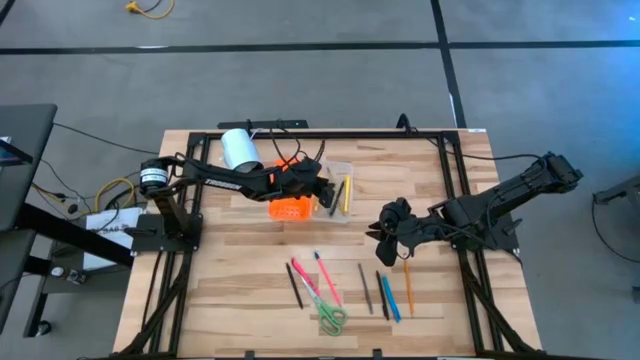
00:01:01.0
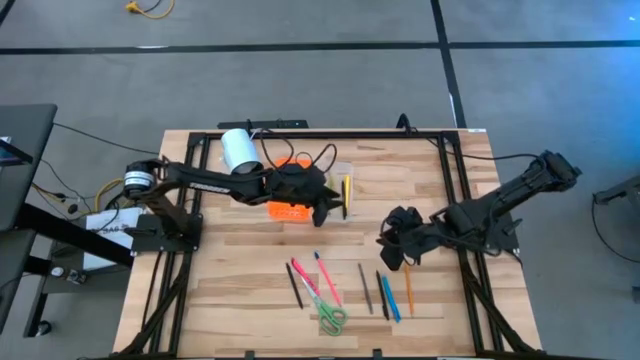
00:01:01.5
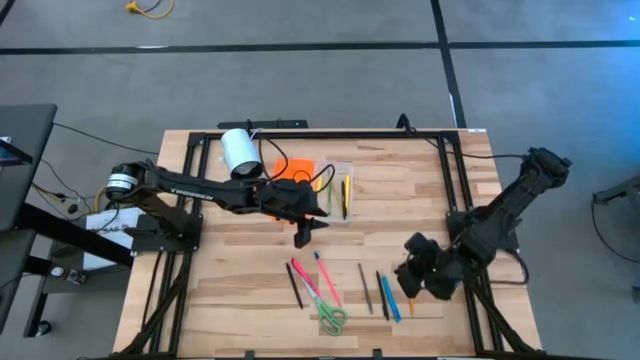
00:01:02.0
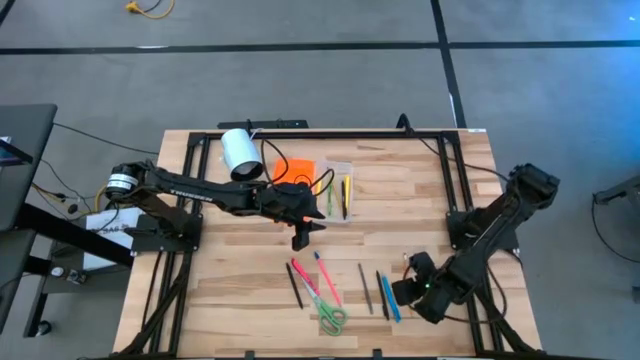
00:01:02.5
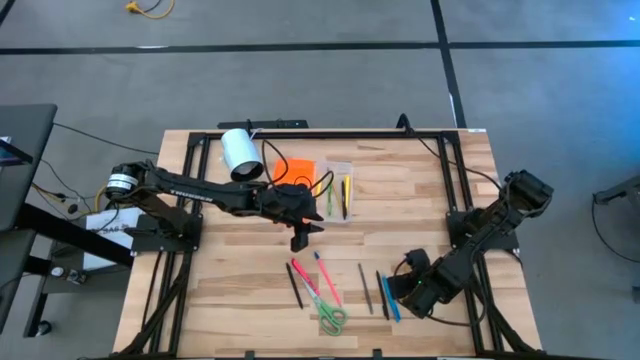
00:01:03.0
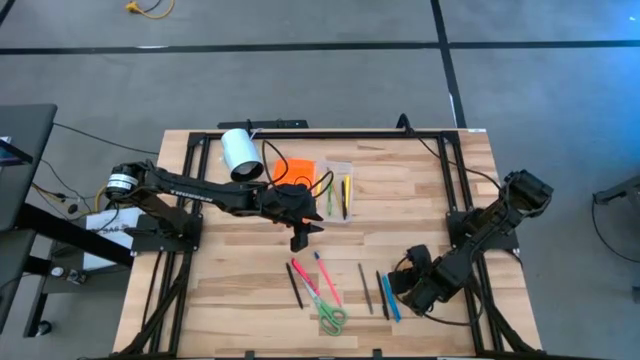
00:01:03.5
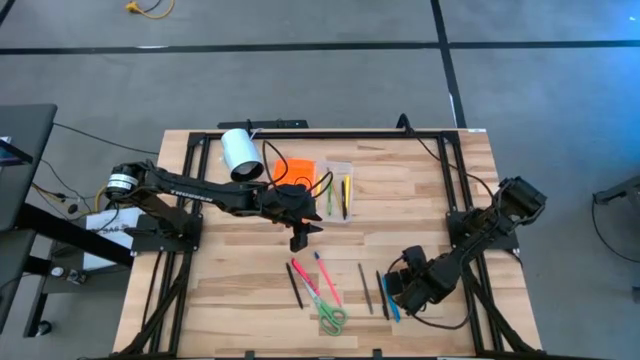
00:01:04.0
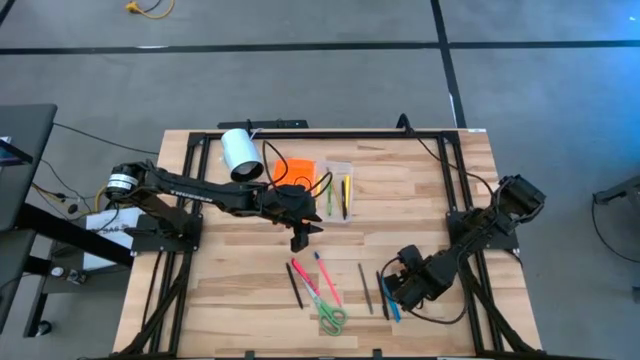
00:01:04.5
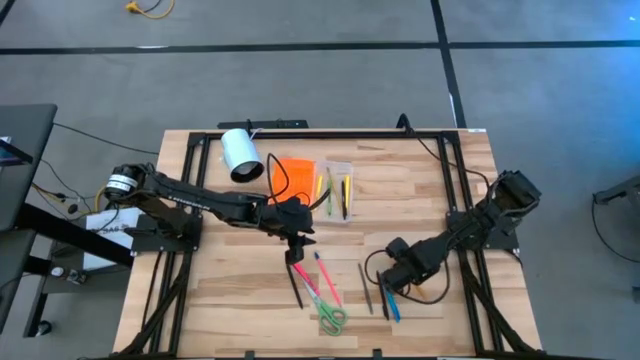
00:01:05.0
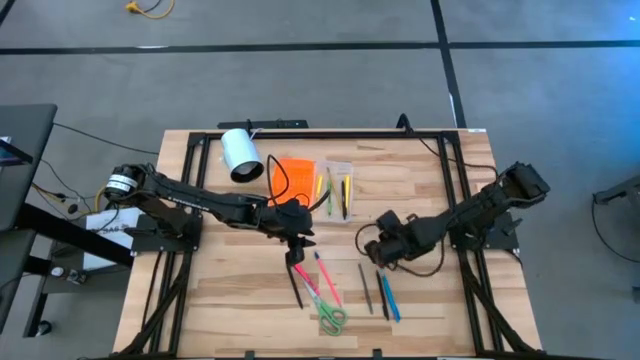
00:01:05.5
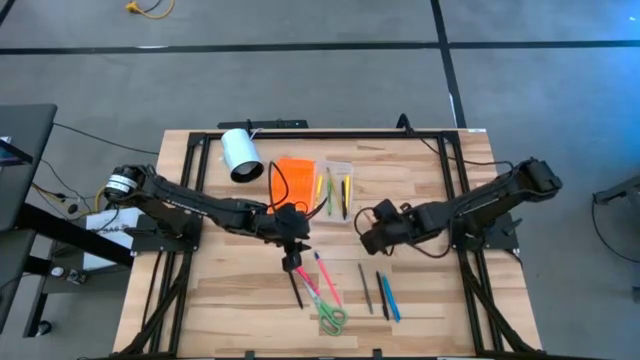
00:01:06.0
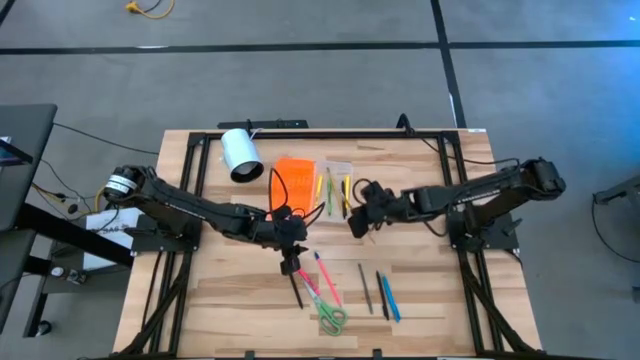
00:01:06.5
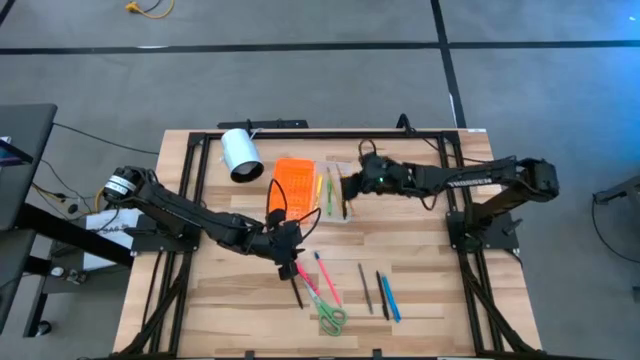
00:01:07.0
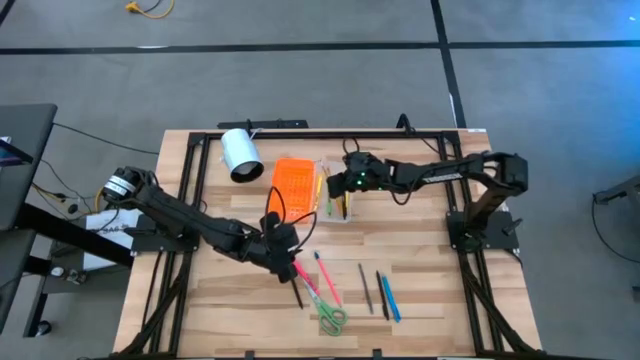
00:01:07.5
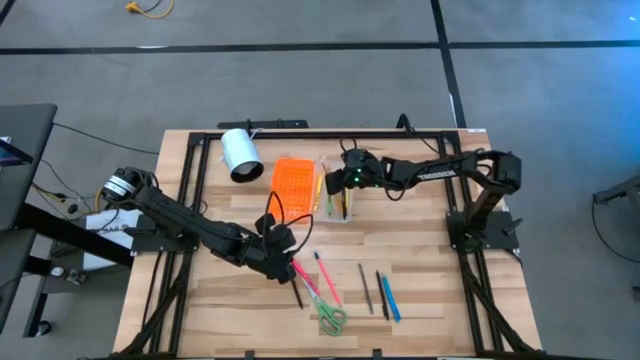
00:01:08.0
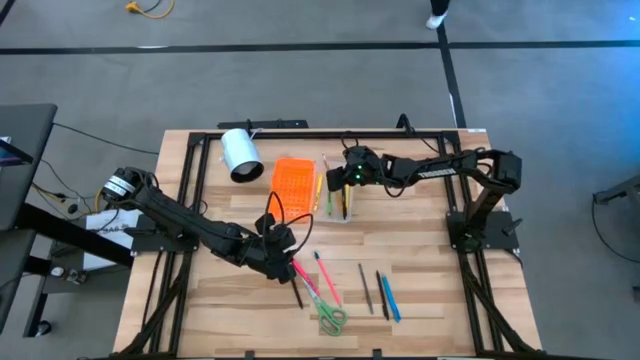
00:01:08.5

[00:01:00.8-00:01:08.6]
Task: Pick & place school supplies into a supply box
Put the orange pencil into the orange supply box

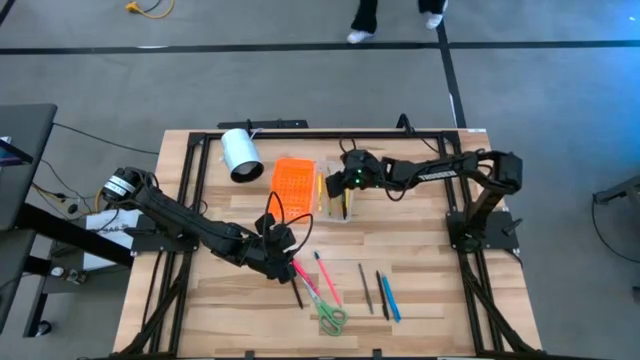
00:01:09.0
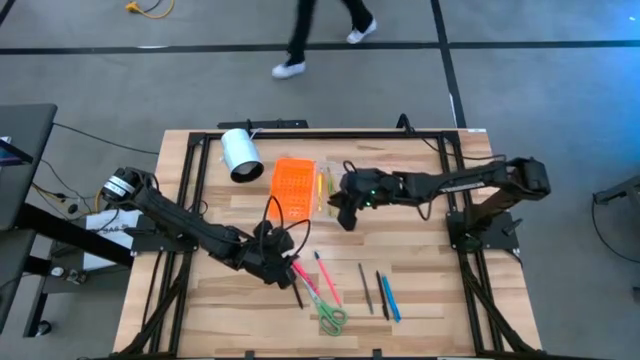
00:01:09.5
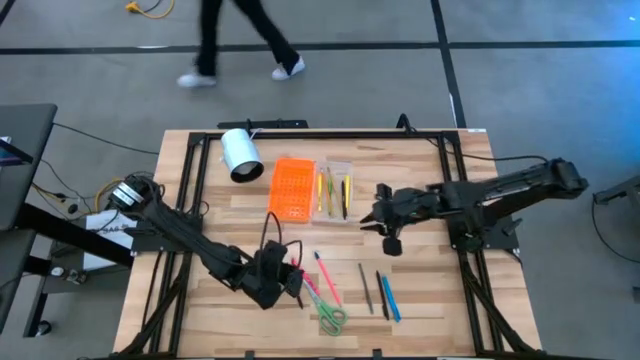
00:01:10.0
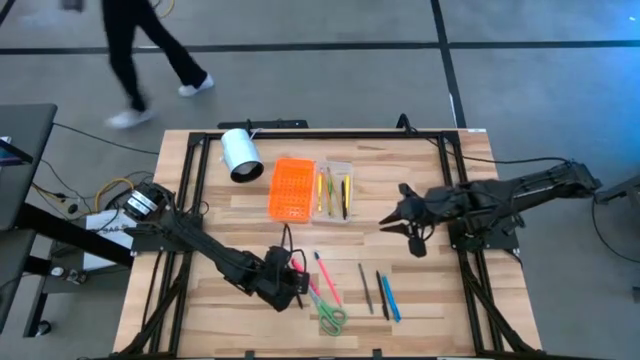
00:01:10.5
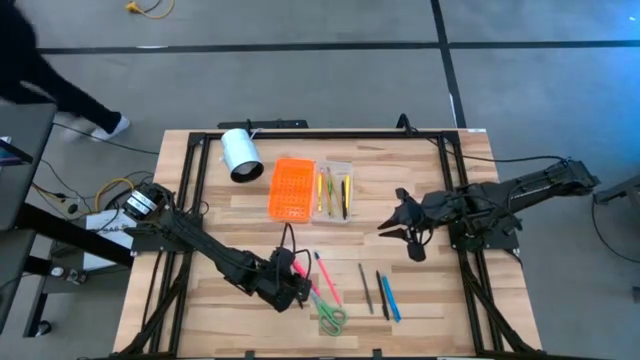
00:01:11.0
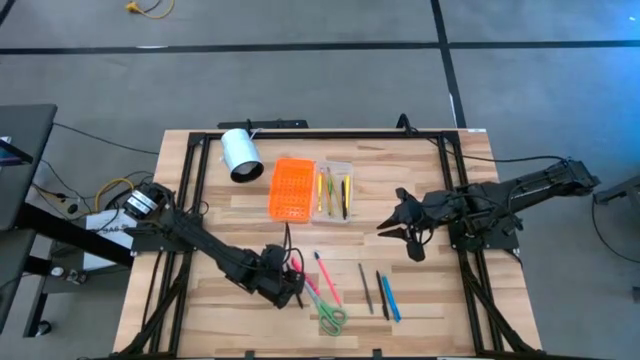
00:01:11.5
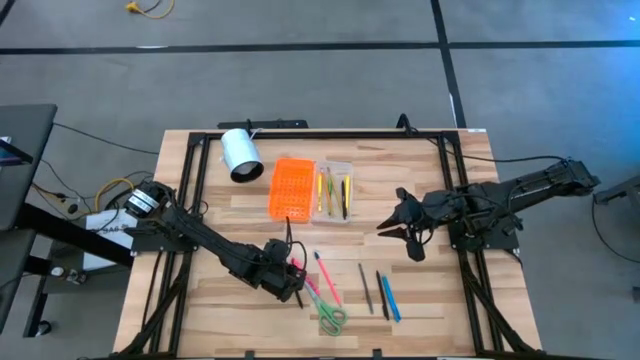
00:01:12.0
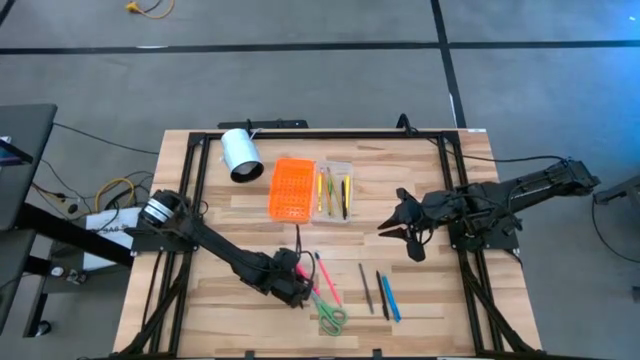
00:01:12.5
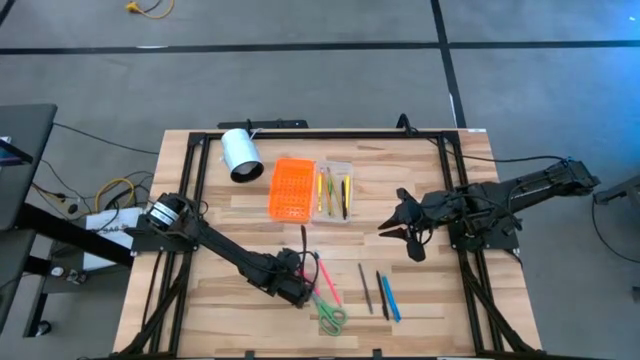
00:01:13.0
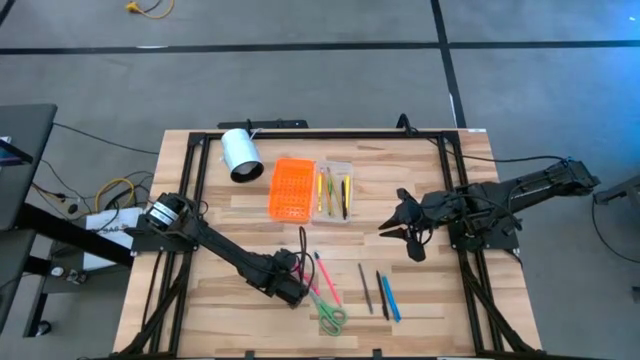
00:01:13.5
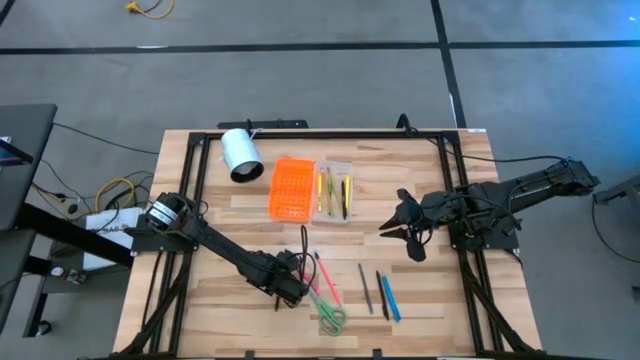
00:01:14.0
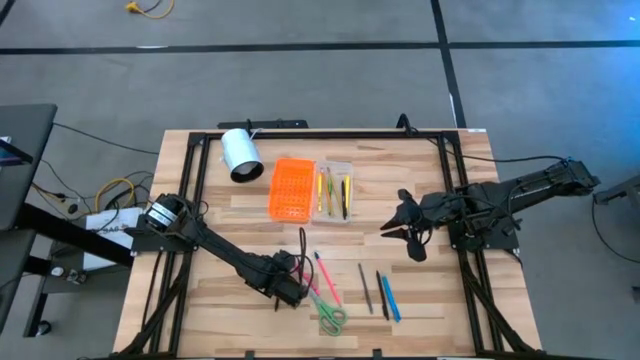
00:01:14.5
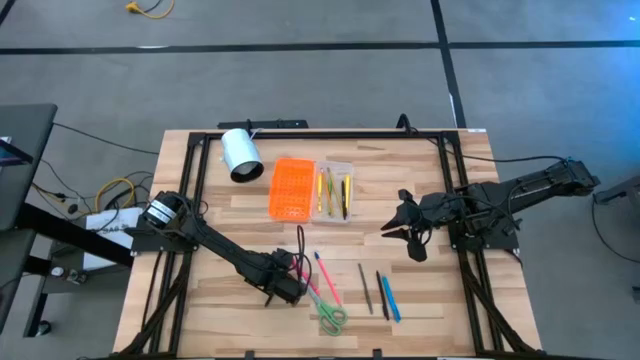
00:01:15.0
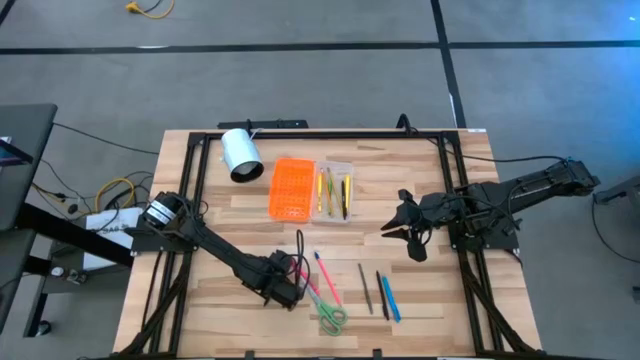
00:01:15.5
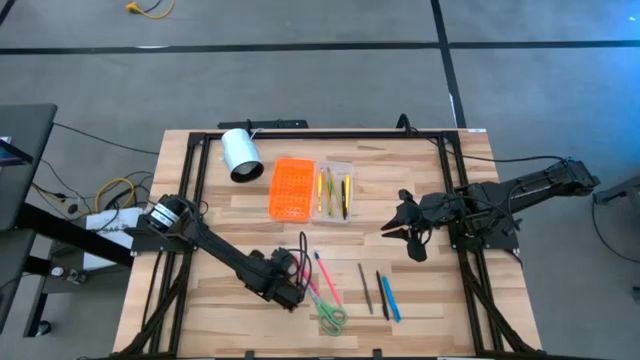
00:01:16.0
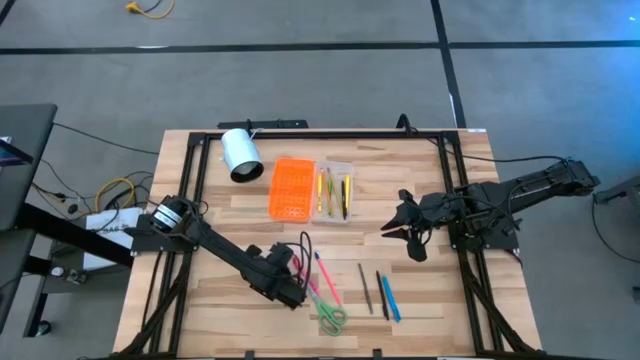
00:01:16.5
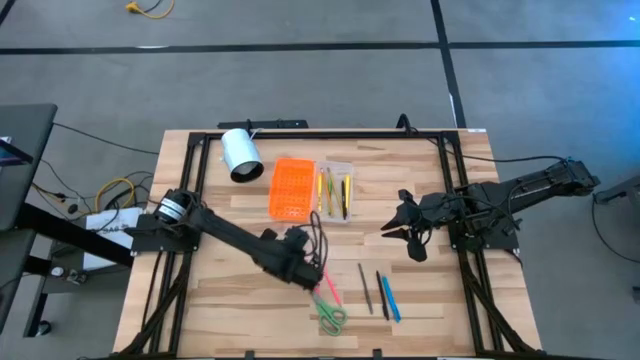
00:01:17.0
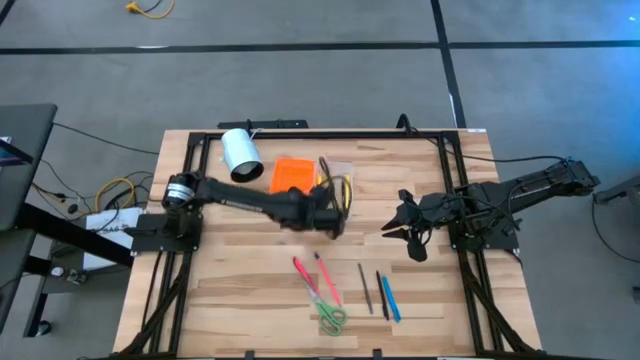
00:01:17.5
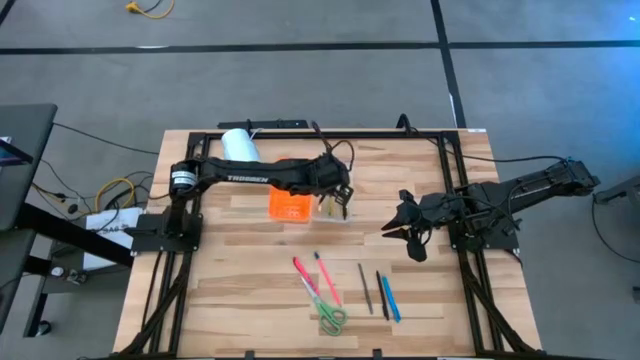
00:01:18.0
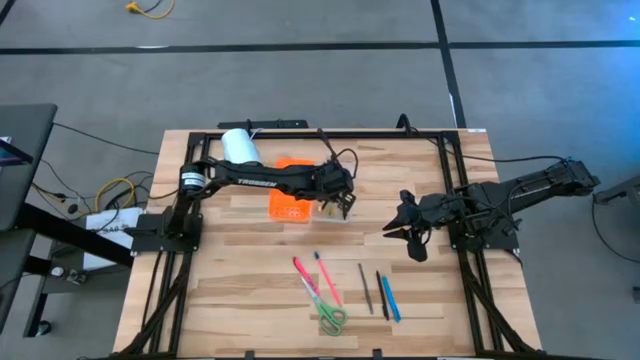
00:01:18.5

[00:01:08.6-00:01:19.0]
Put the left black pen into the orange supply box

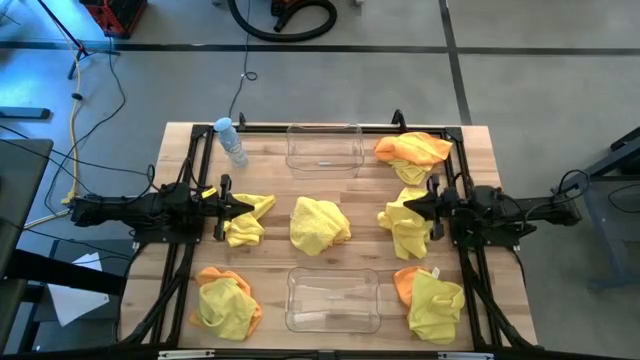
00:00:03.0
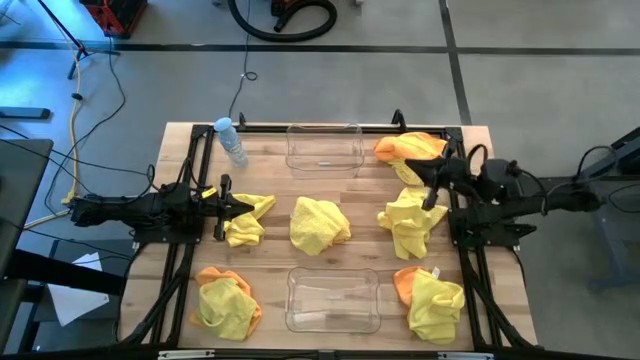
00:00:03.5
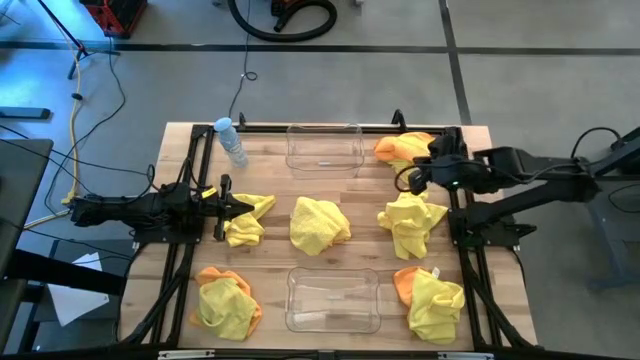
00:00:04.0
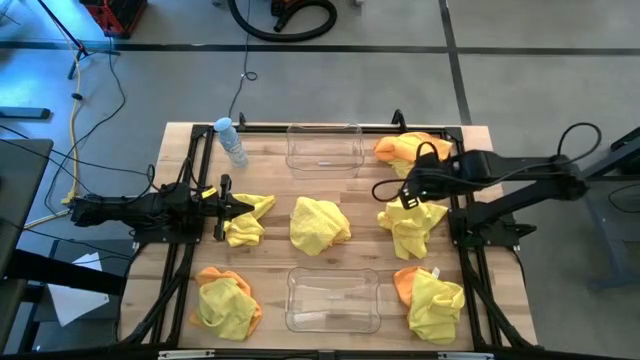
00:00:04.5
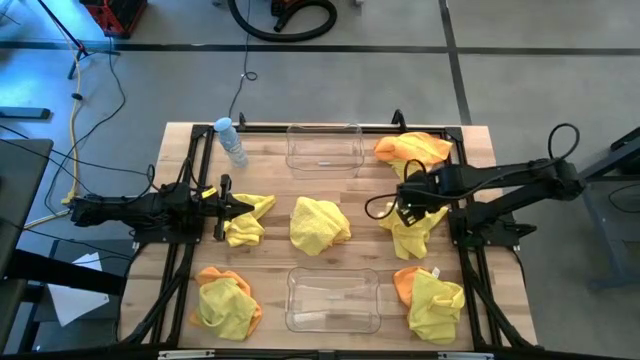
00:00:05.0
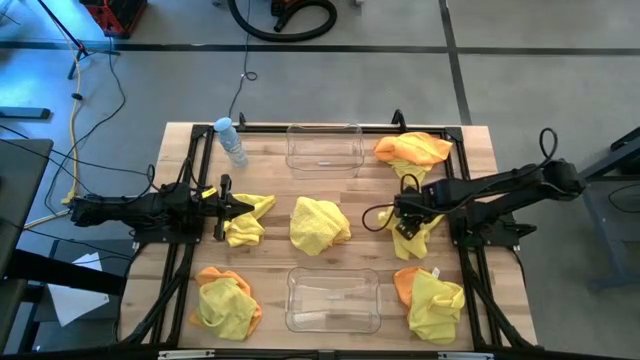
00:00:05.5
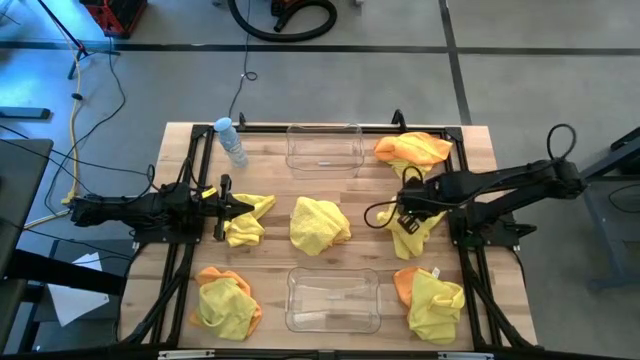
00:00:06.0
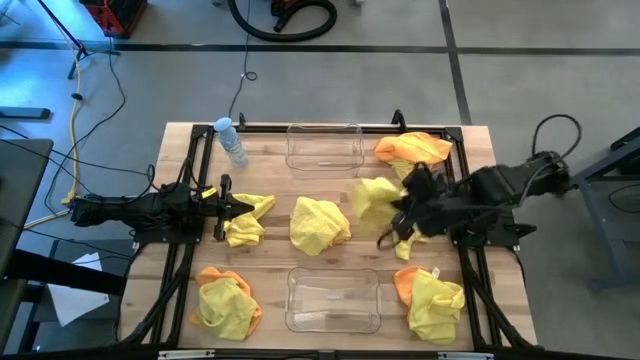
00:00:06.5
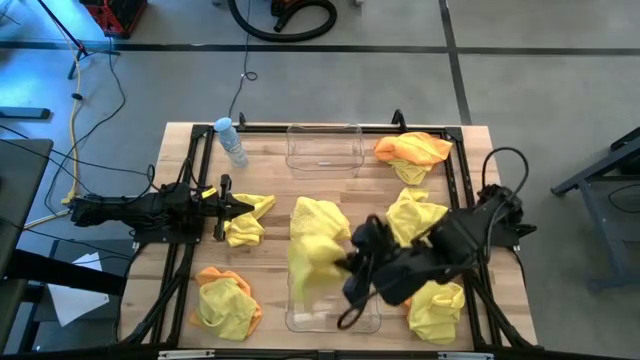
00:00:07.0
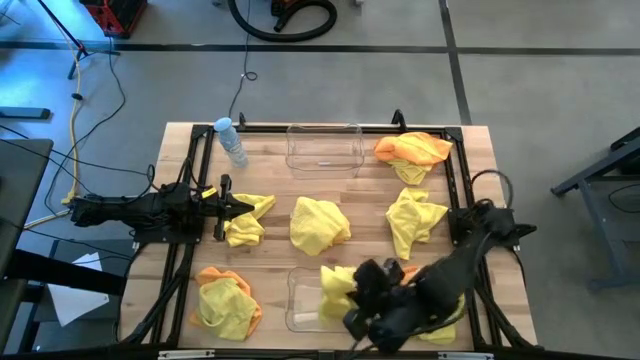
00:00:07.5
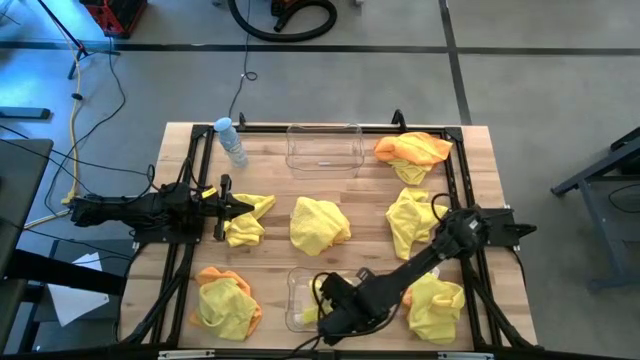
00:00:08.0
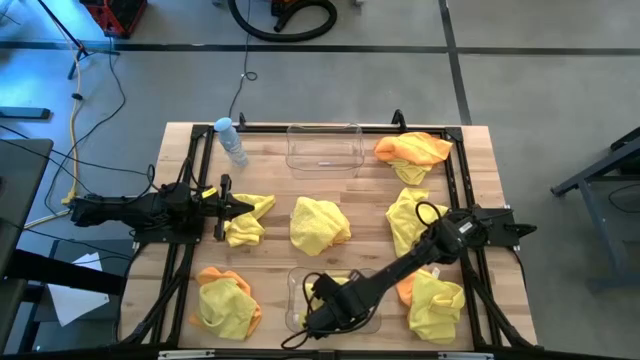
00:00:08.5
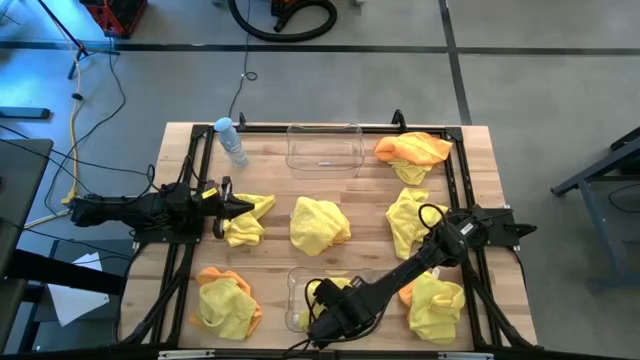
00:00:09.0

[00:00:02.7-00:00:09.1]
Task: Sort microfiber towel by color & place in baskets
Put the yellow microfiber towel into the bottom transparent bin
